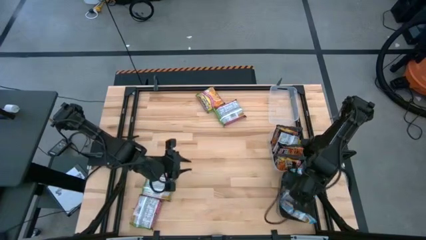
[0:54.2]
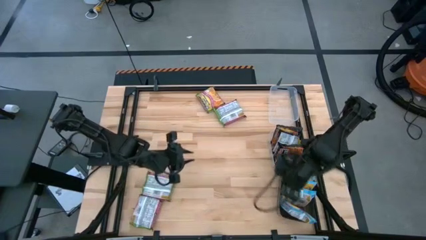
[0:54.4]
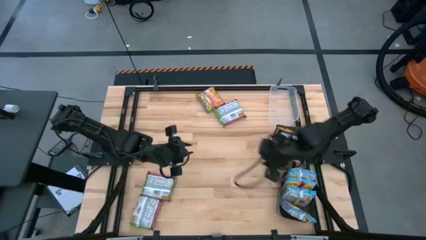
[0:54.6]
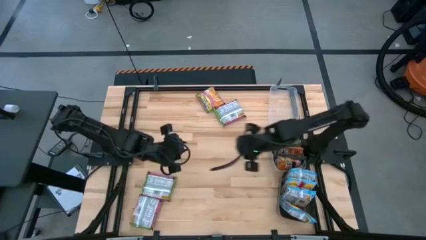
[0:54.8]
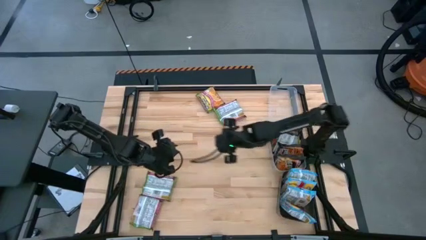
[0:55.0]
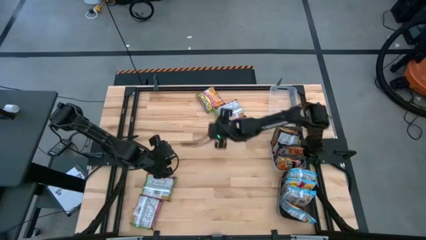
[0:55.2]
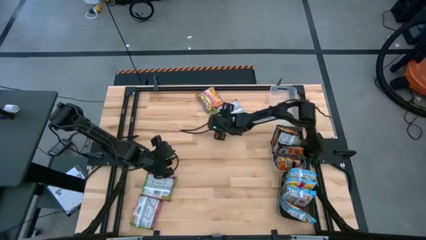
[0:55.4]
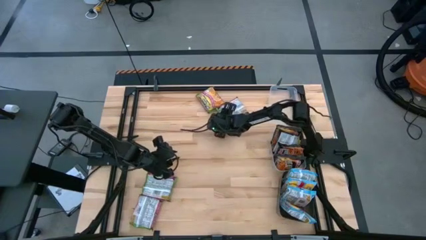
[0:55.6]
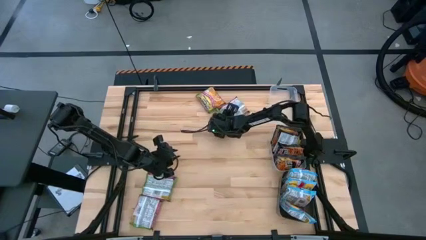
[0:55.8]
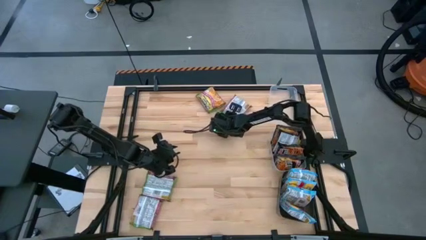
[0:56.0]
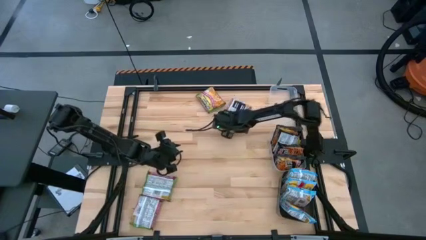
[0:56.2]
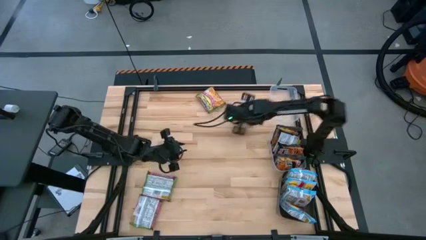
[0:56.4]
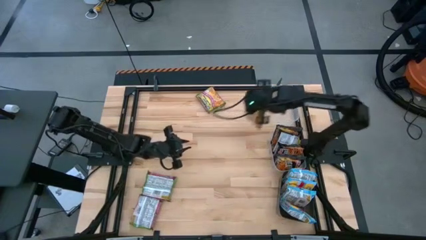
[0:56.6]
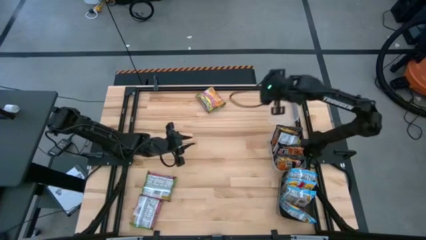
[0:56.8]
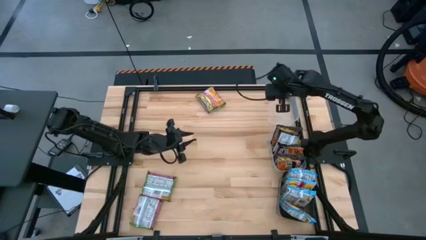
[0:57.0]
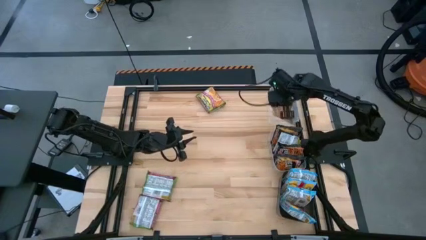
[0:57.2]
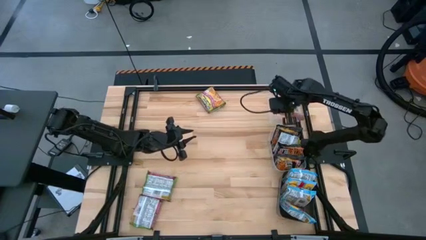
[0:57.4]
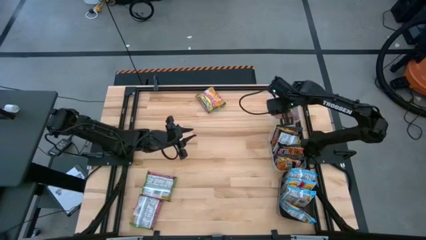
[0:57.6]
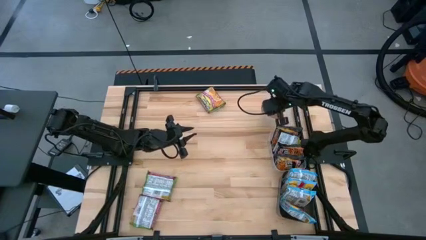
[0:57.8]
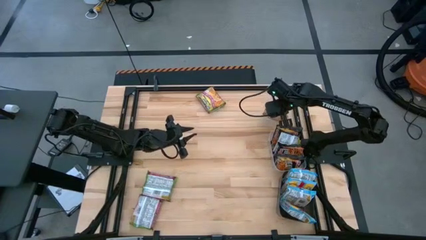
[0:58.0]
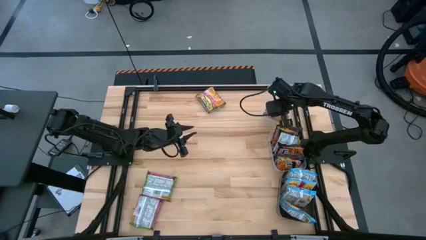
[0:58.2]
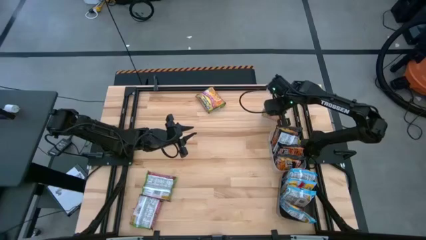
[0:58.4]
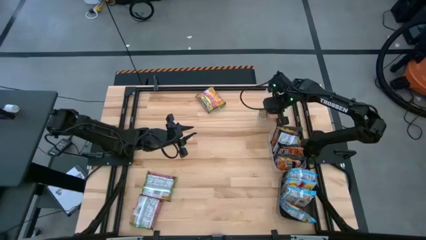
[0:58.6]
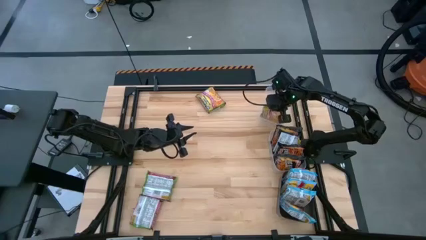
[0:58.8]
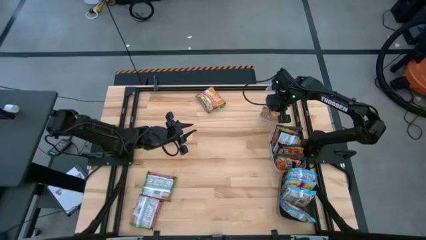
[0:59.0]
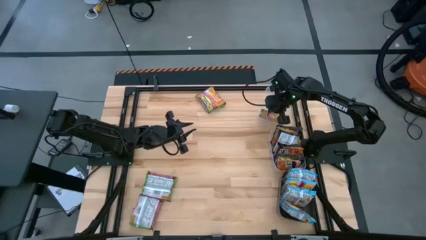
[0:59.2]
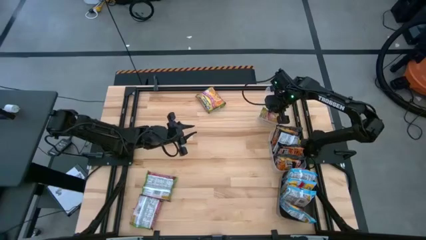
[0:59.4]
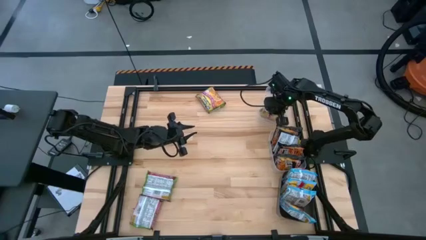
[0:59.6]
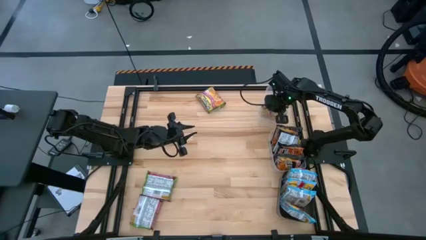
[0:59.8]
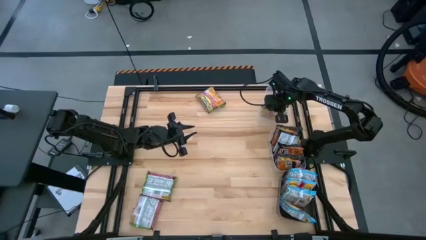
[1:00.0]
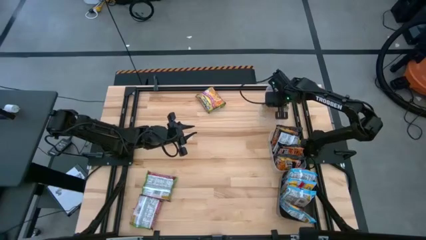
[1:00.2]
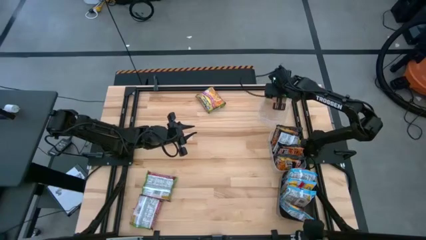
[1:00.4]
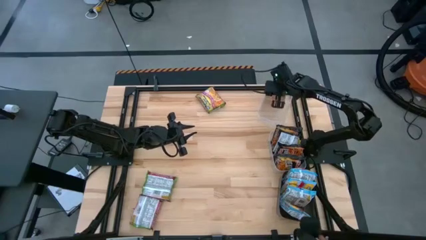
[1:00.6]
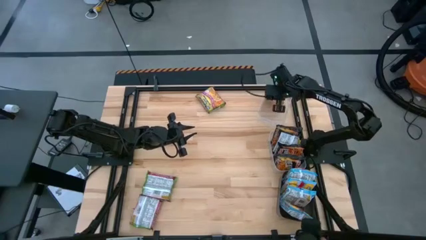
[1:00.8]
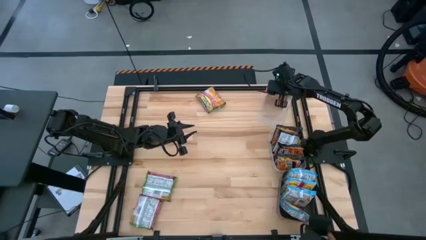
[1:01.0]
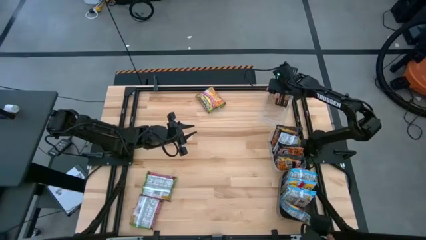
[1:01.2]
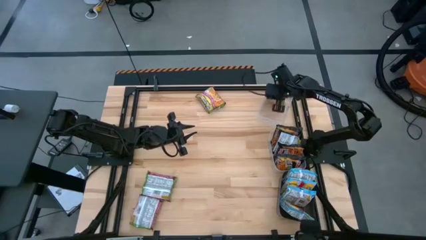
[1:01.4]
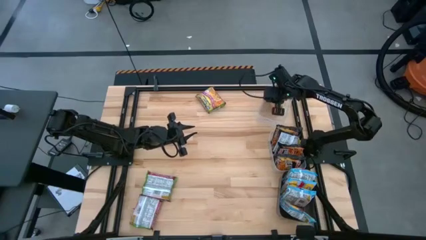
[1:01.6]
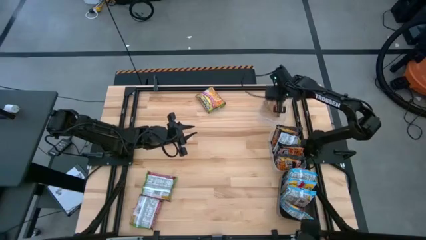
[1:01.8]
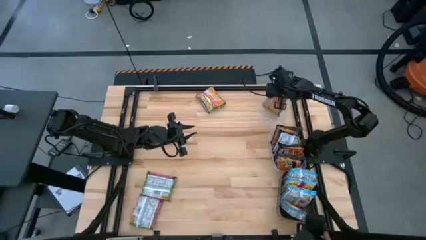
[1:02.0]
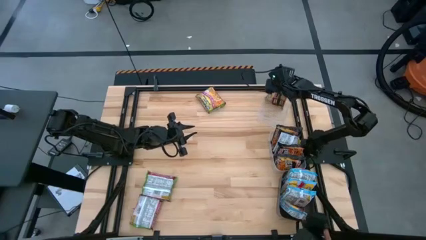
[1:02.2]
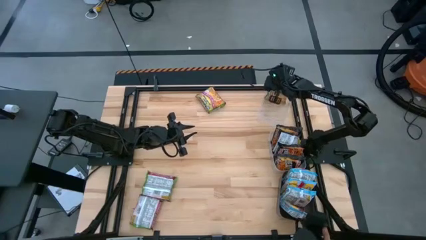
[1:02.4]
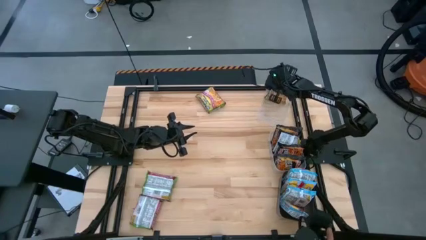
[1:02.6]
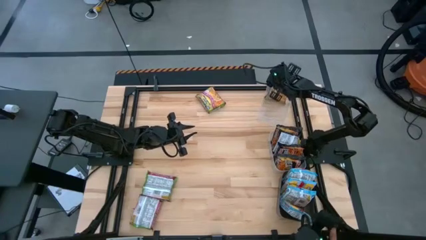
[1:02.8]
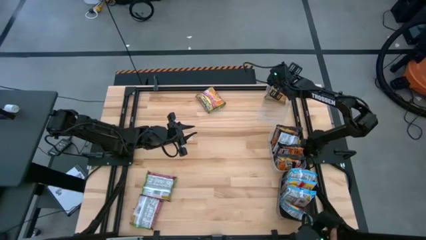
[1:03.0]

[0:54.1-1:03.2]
Task: Sort Maruchan noodles
Put the green noodle pack into the top transparent bin

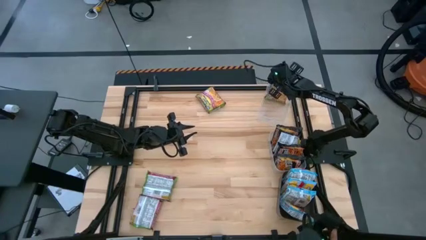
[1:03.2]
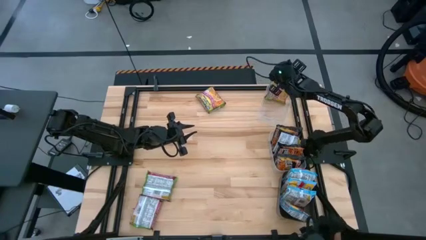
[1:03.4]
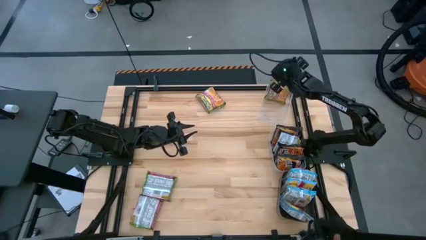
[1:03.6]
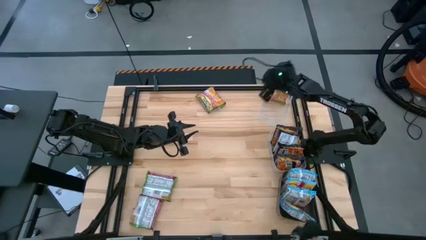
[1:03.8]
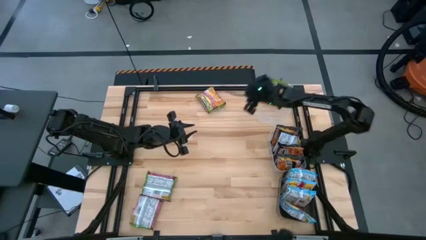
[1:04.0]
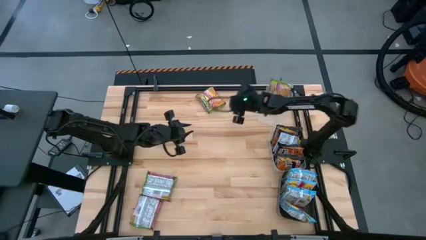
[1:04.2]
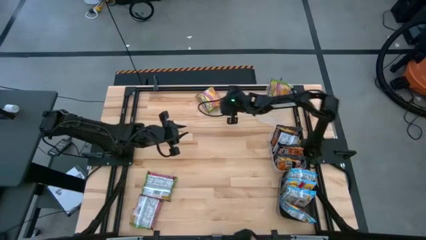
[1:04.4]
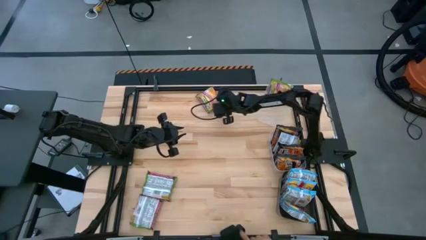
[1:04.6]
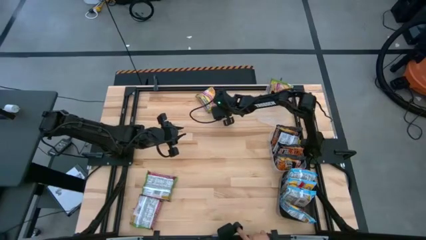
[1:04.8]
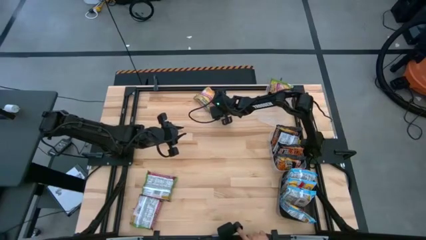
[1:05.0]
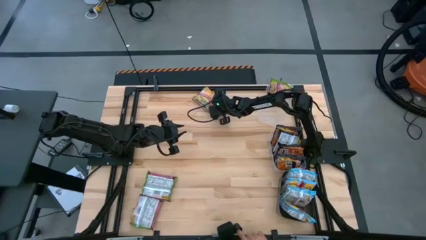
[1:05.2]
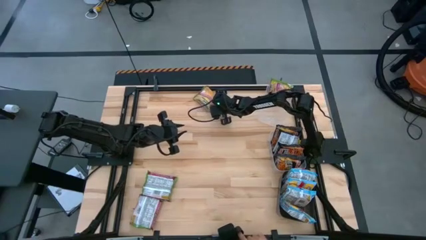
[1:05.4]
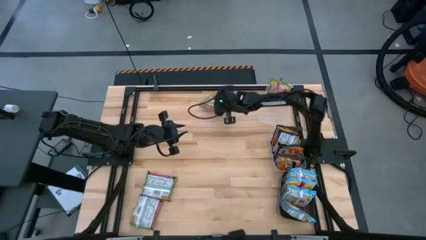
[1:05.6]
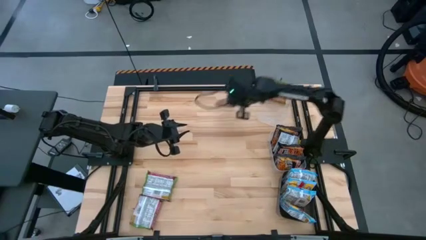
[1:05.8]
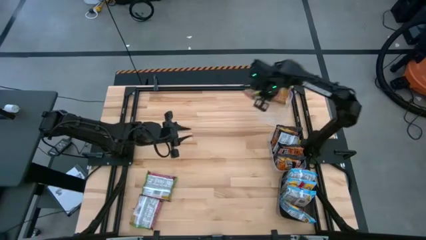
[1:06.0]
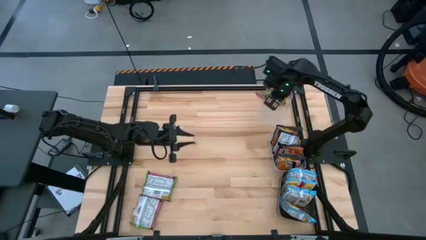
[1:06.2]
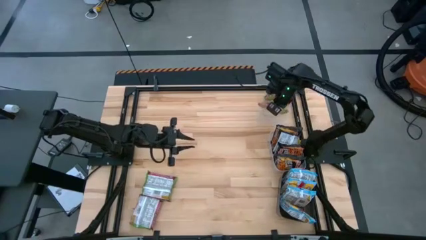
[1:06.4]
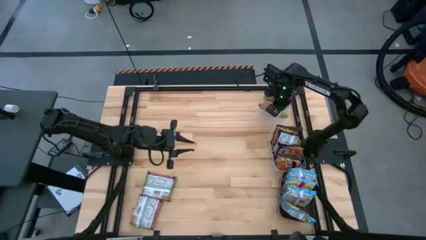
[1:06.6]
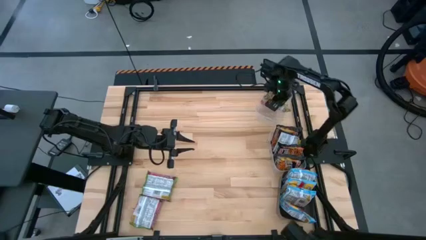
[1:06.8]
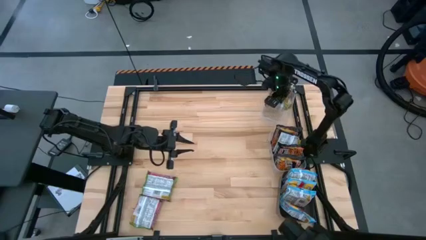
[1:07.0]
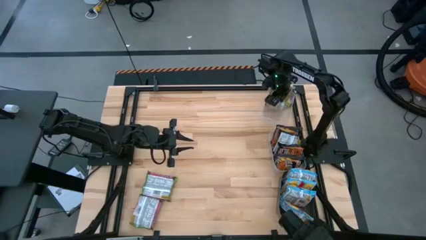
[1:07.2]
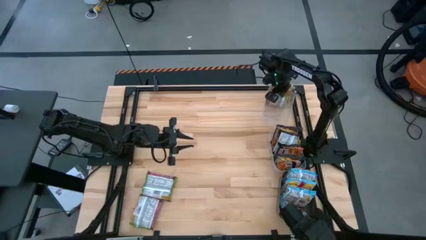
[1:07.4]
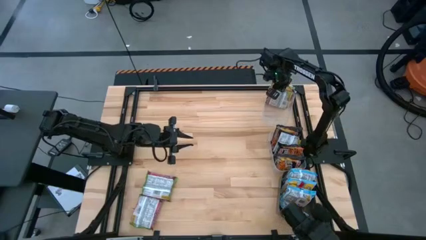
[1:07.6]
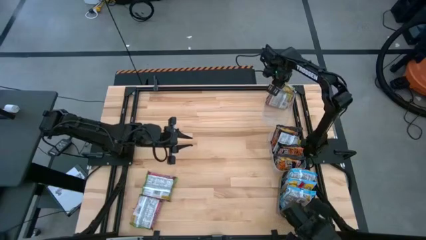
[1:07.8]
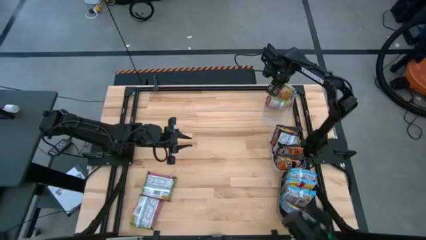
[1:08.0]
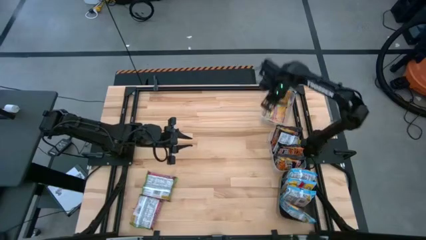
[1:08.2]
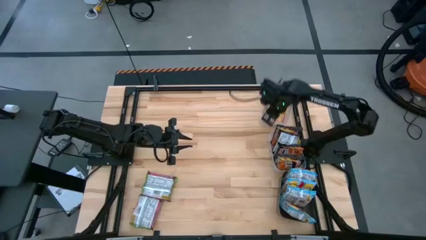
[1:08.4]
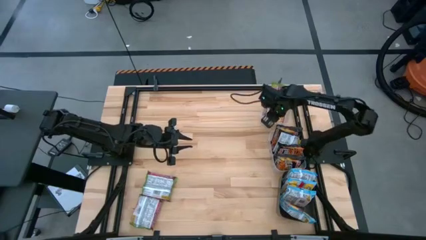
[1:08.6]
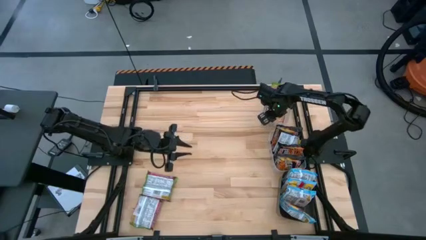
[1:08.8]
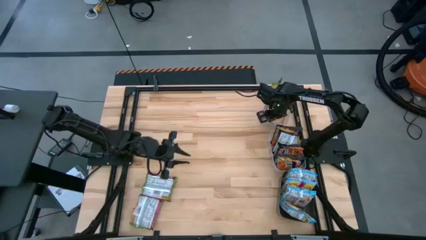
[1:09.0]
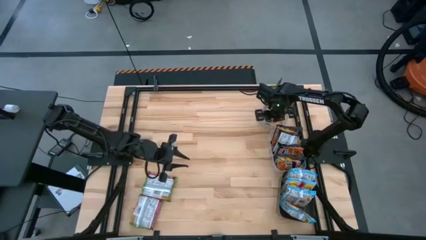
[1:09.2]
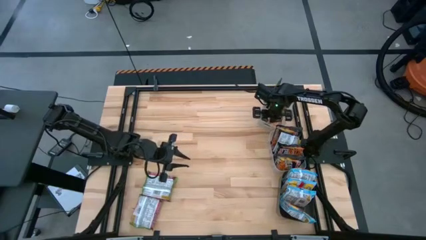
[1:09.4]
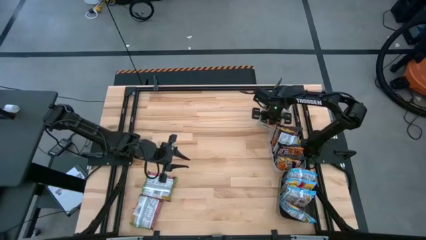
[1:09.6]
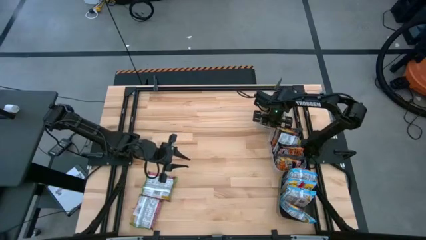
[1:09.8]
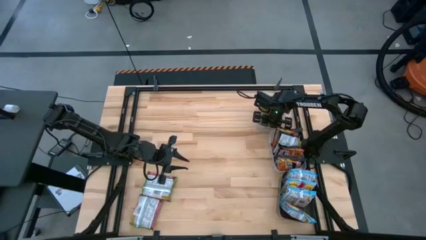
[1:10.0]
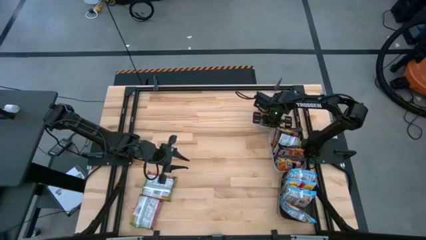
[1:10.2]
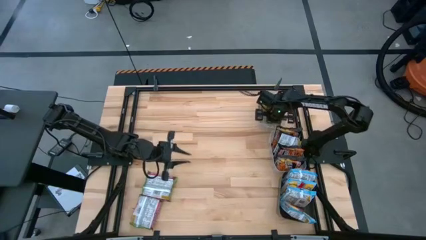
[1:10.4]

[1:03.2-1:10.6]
Put the green noodle pack into the top transparent bin

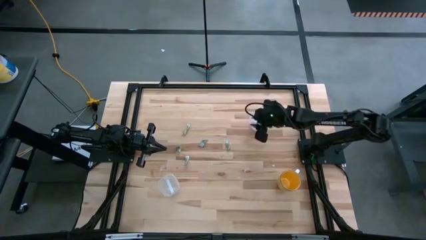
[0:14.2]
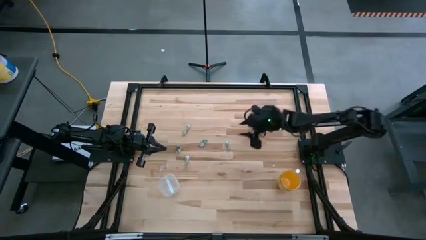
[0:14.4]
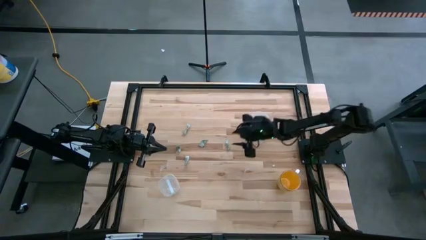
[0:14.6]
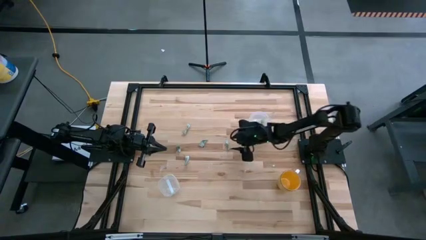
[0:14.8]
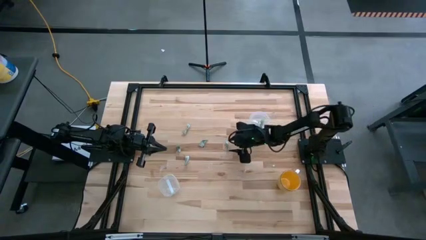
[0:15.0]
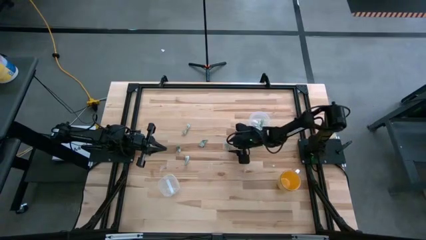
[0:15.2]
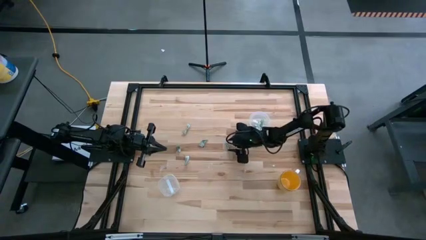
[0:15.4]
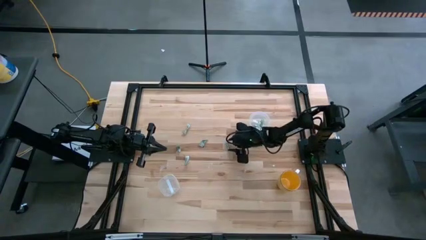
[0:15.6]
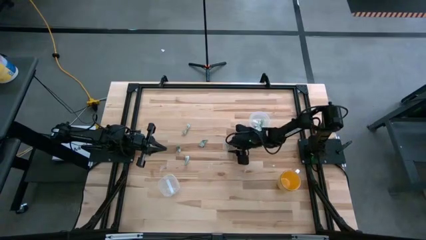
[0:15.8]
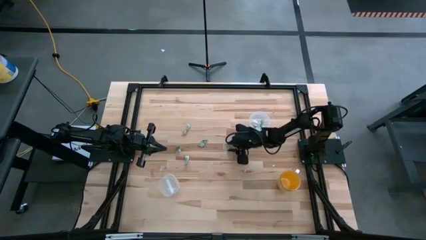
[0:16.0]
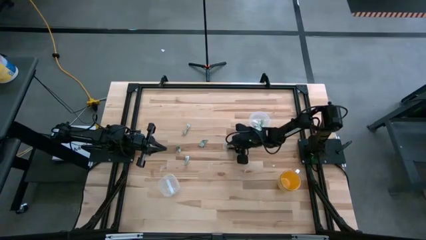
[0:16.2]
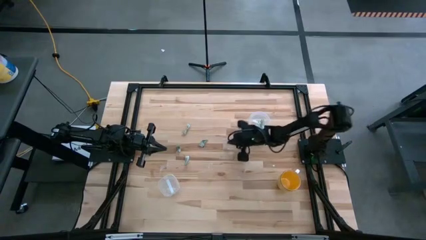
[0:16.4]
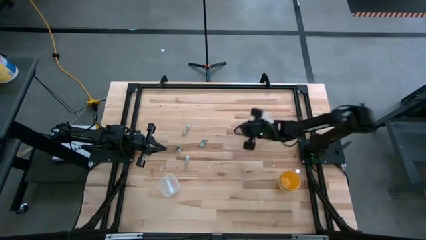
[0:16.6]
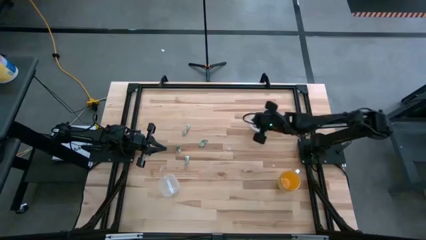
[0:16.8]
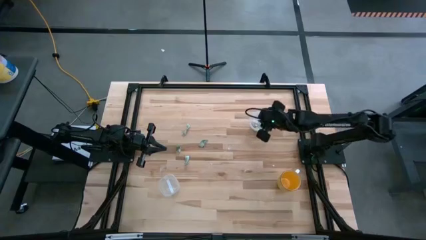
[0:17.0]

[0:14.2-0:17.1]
Task: Pick and place Stevia / Truvia into bins
Put the stevia packet into the round transparent container
